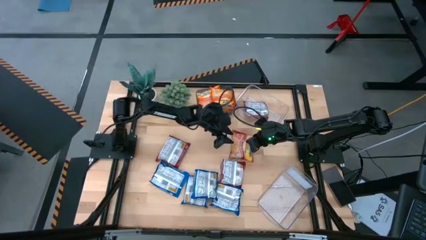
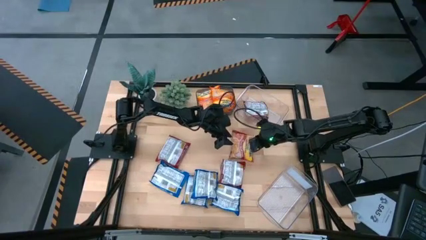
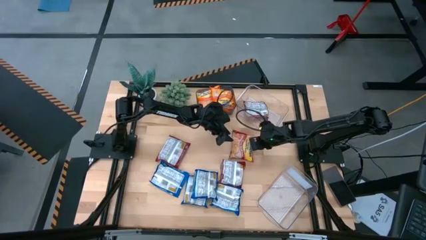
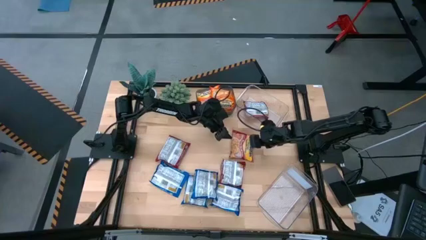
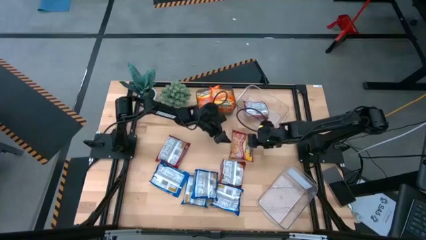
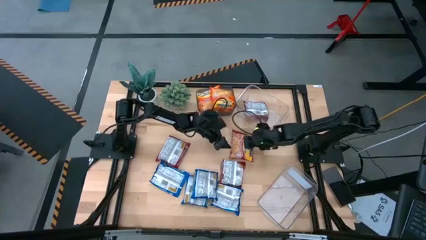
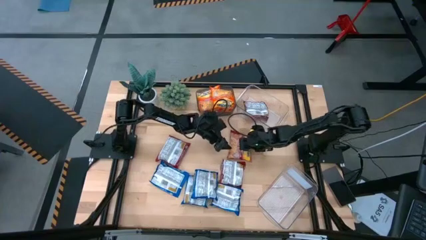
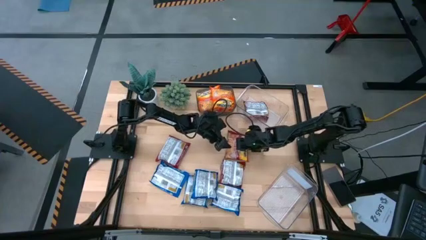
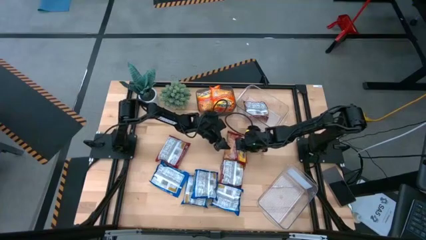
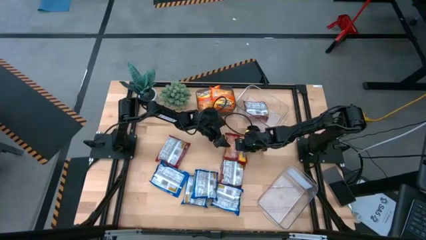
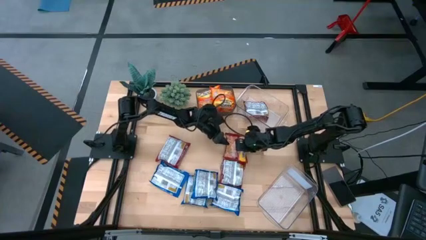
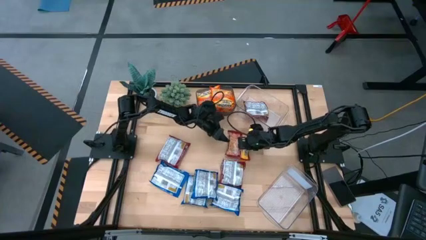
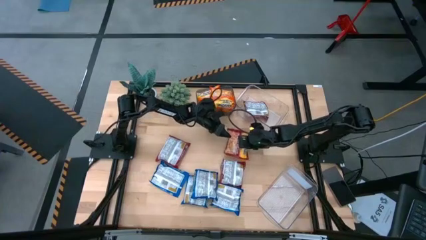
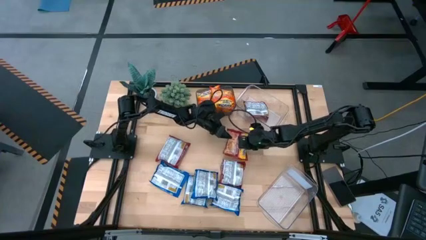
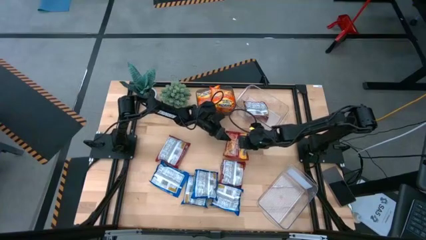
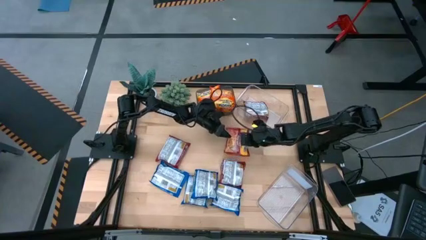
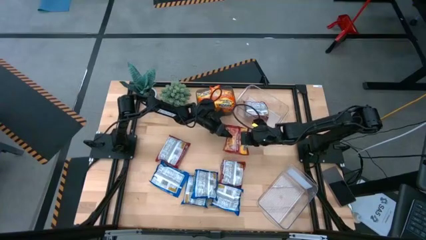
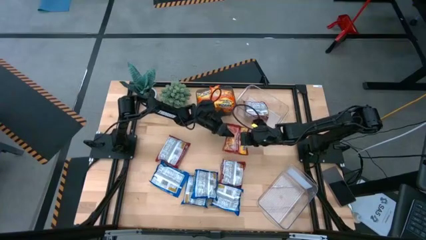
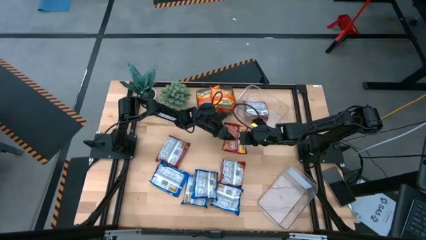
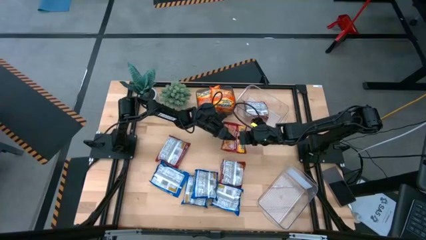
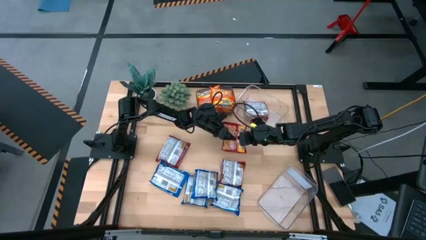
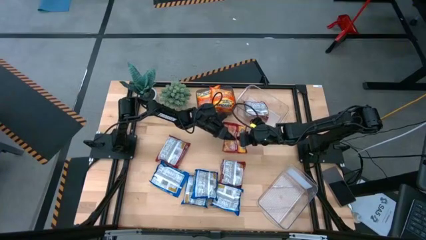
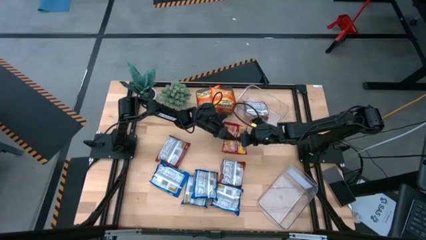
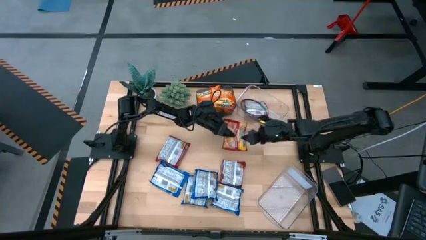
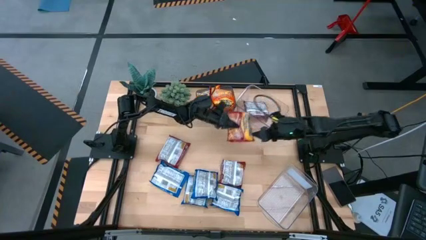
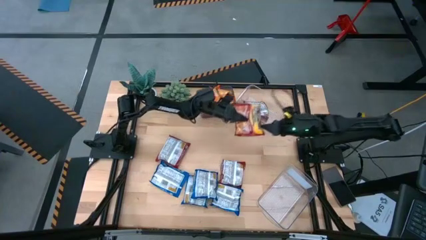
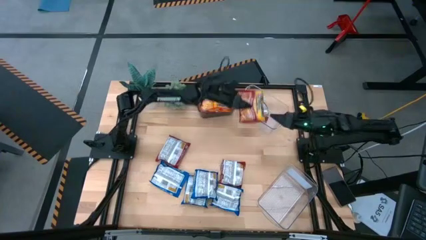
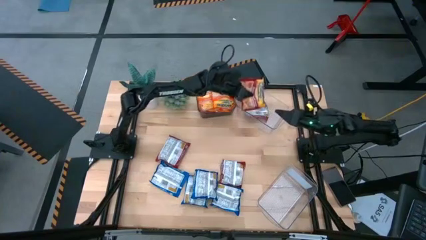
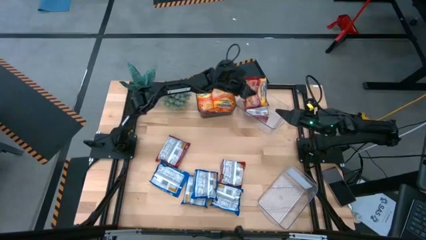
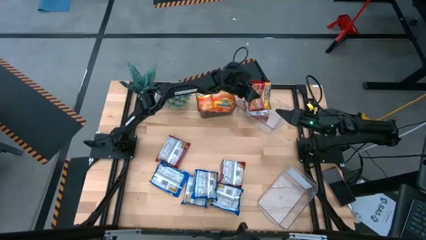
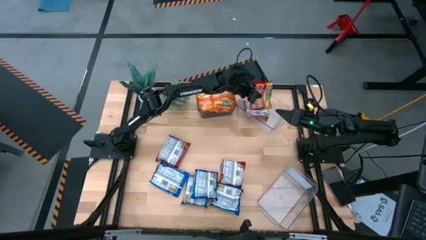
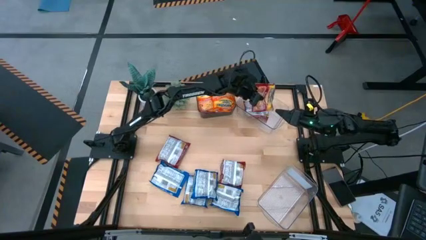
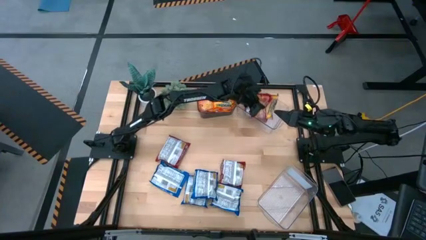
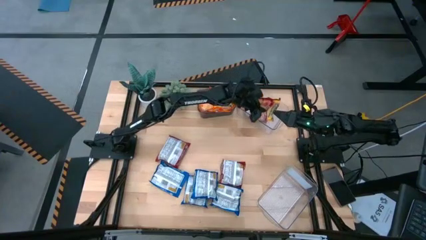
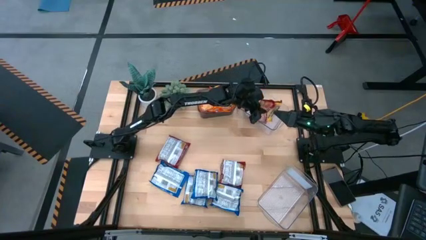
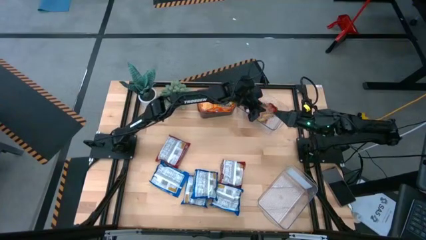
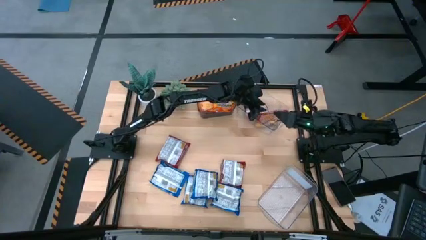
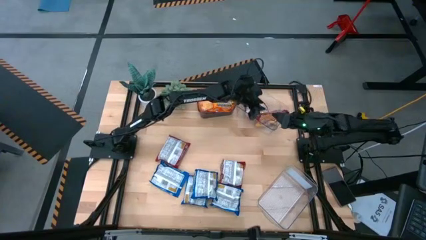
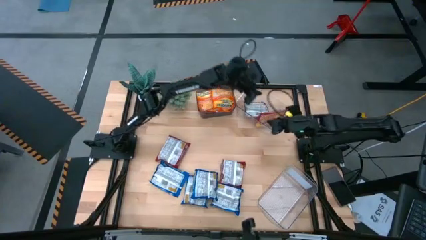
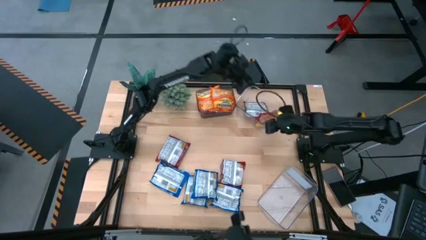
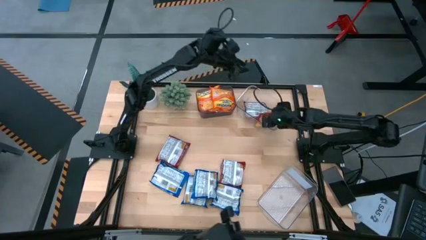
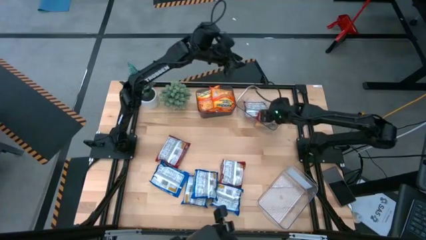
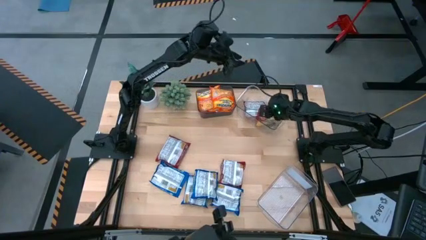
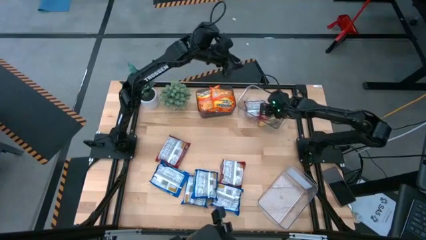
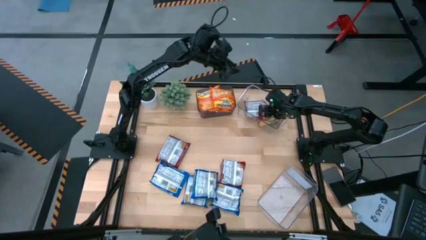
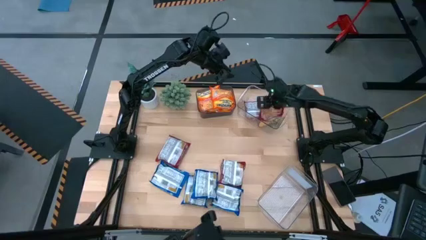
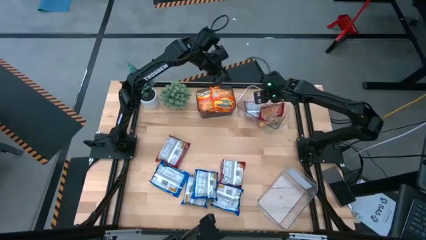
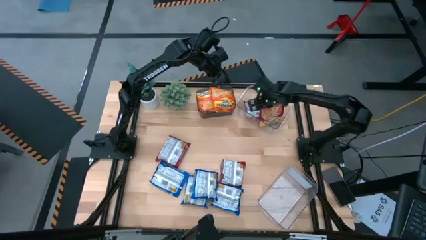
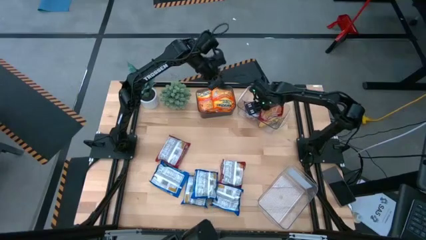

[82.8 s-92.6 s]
Task: Sort Maruchan noodles
Put the red noodle pack into the top transparent bin

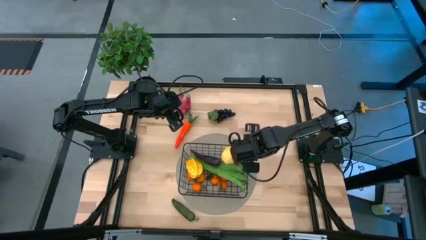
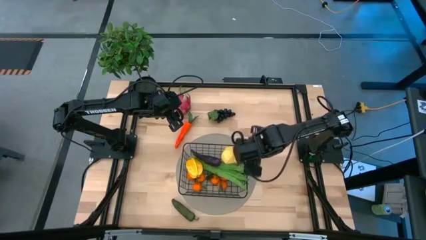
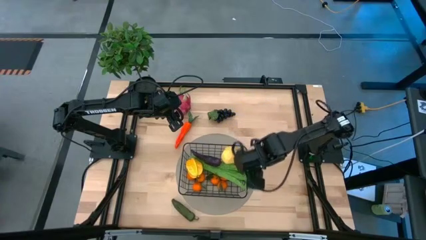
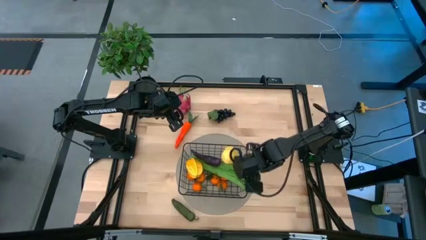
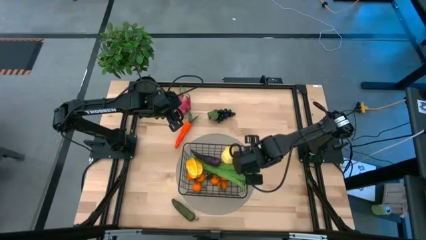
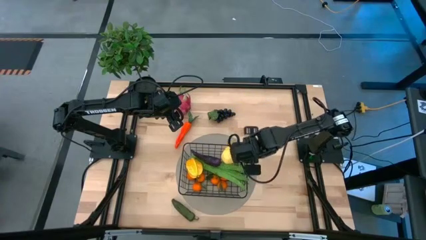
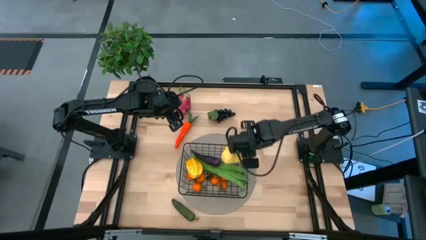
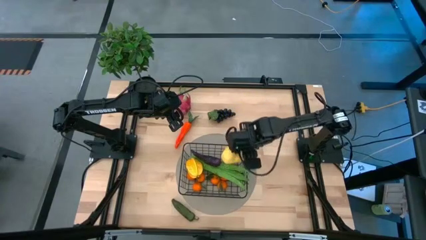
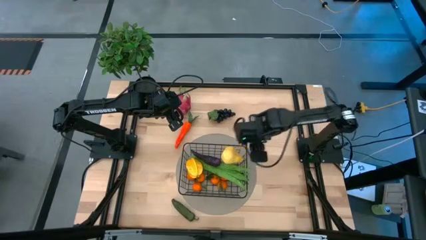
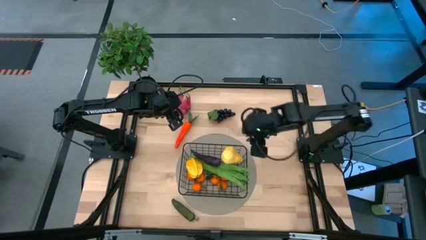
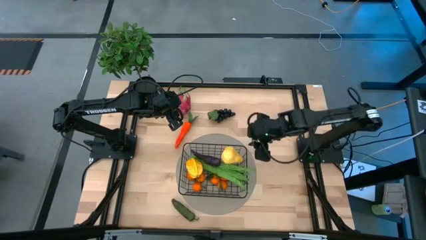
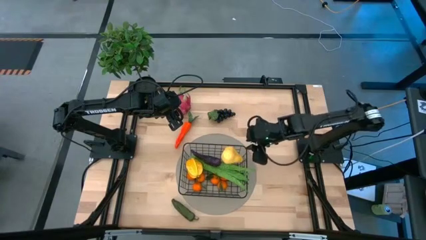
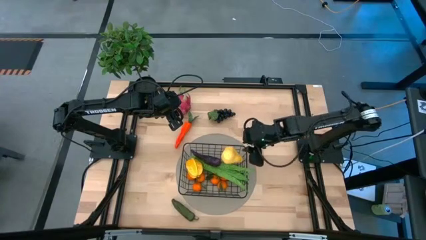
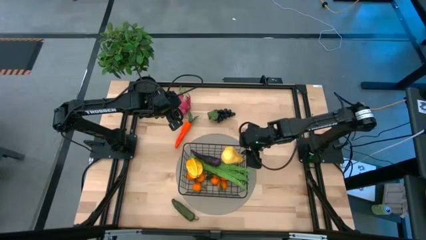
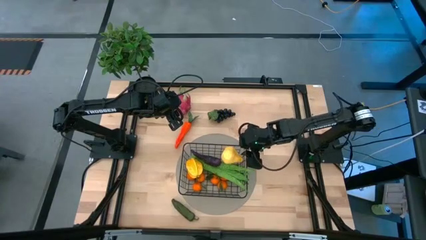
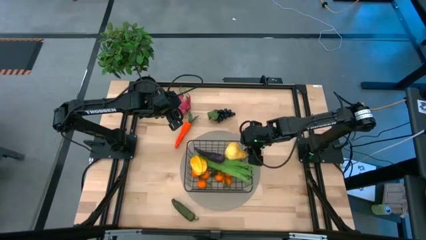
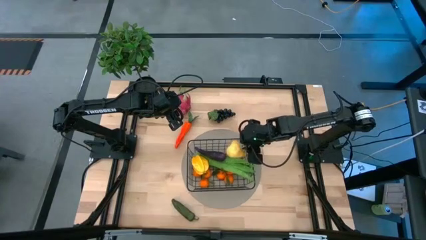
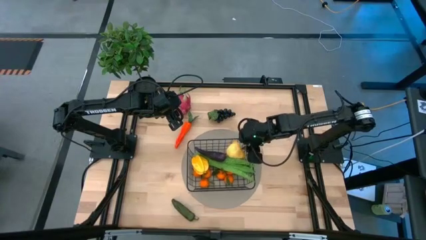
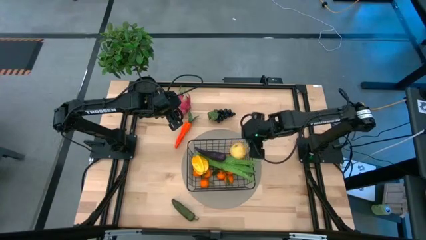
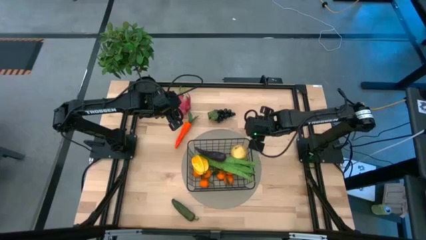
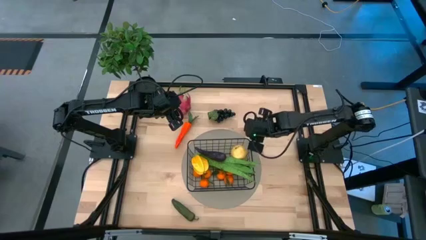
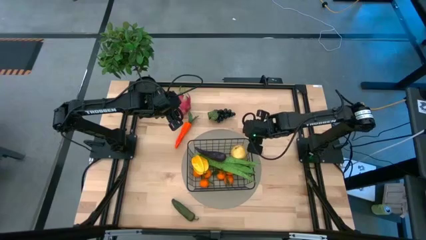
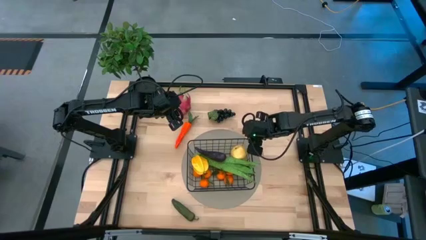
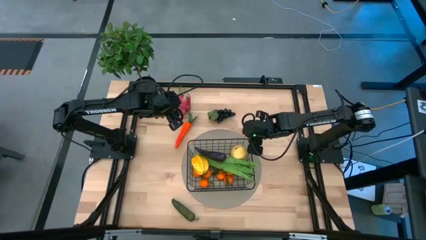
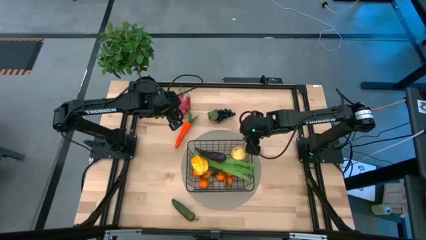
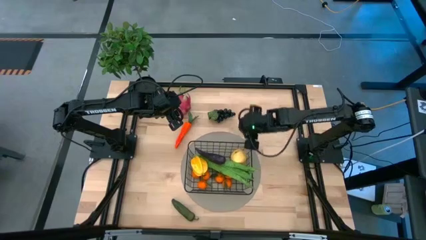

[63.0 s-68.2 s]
Task: Build produce basket
Adjust the black basket
